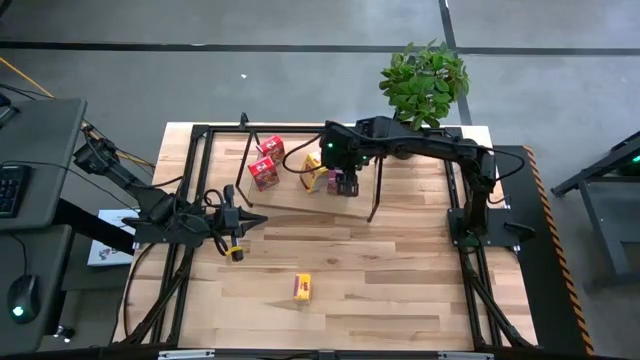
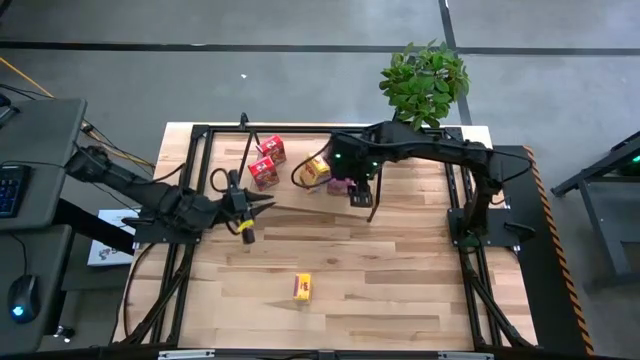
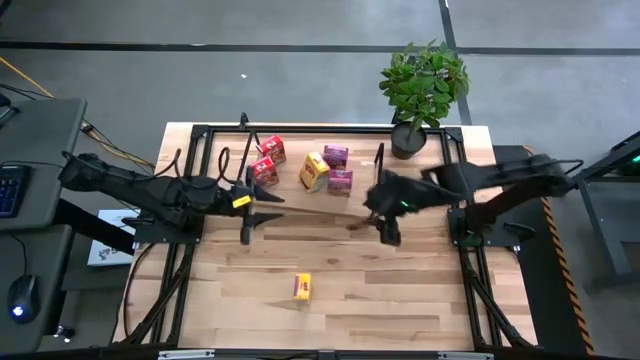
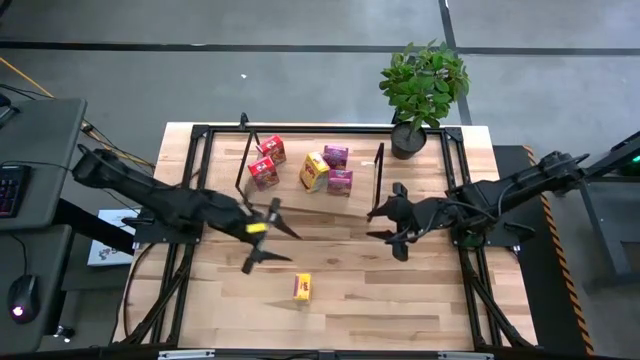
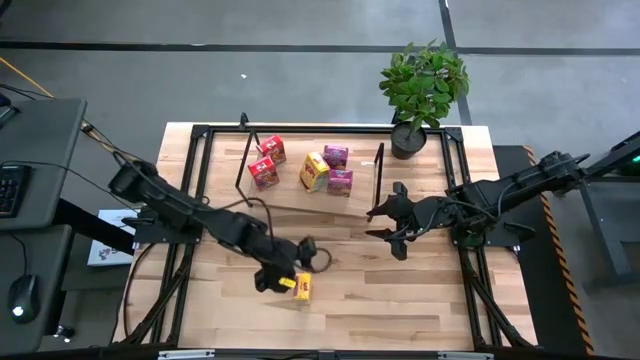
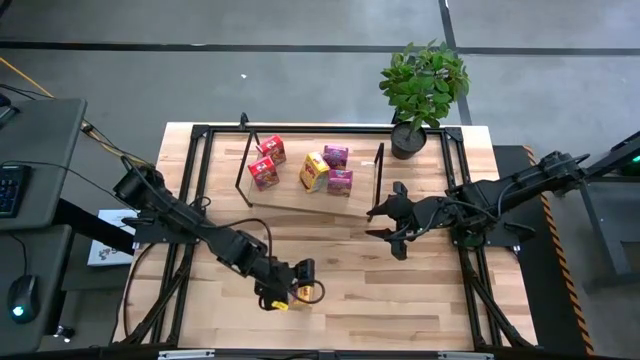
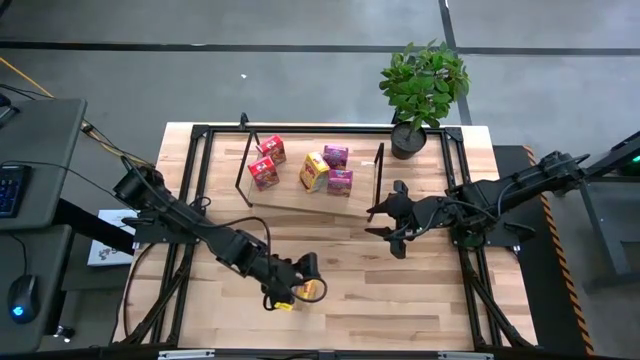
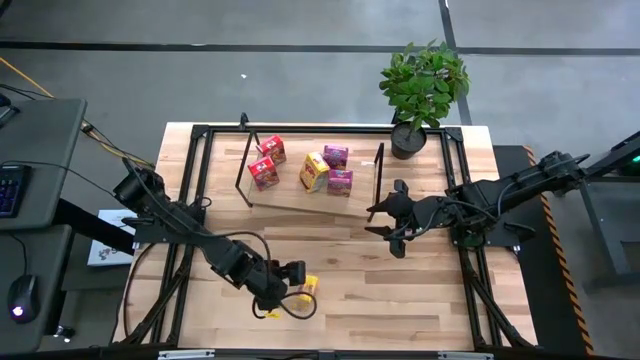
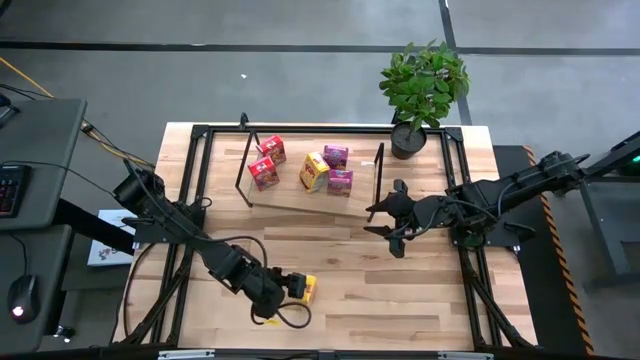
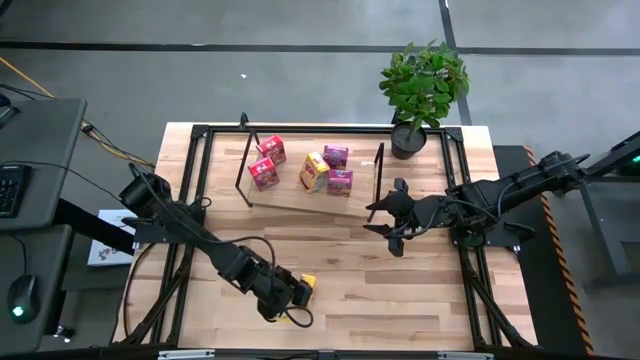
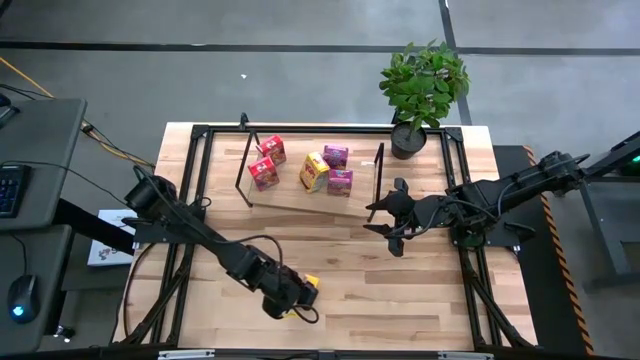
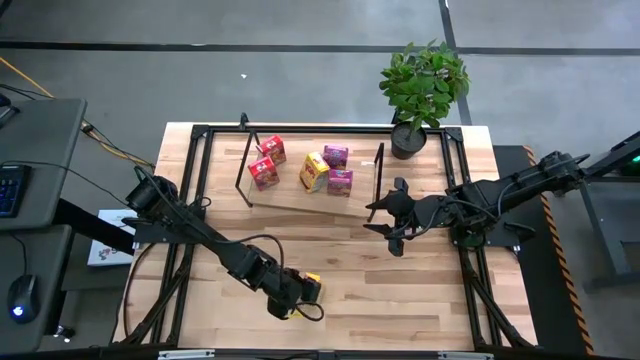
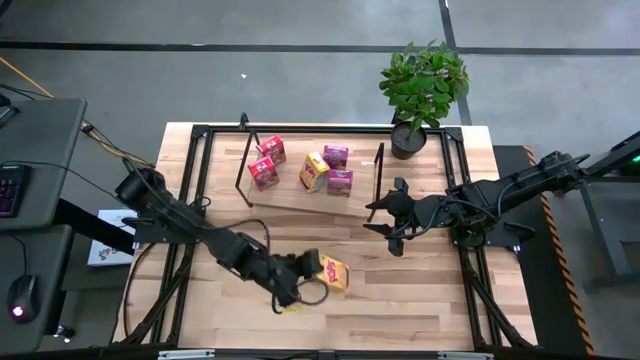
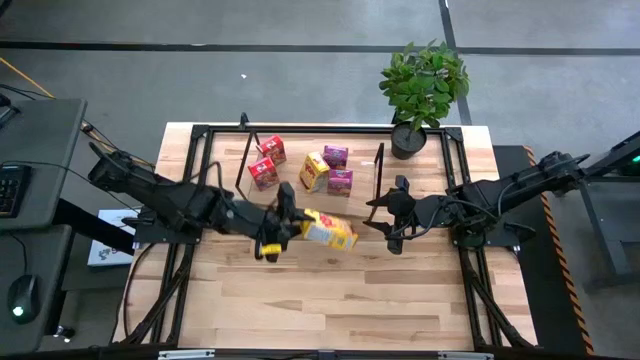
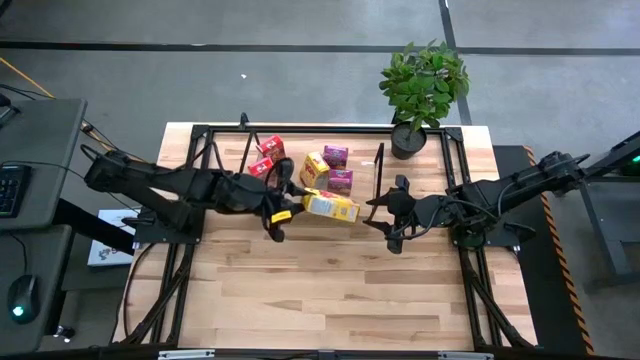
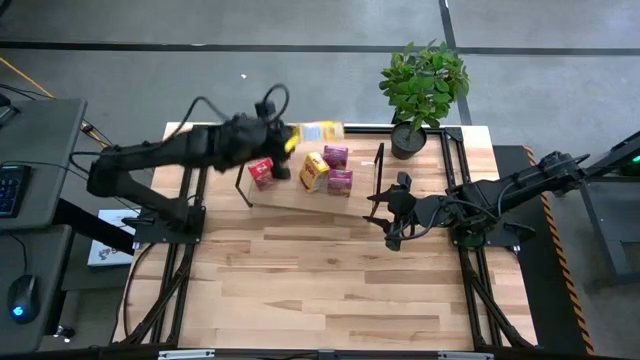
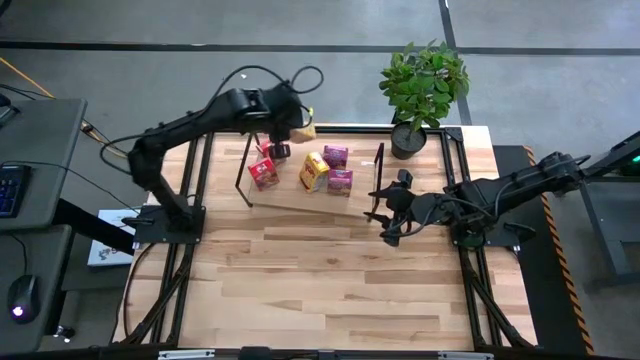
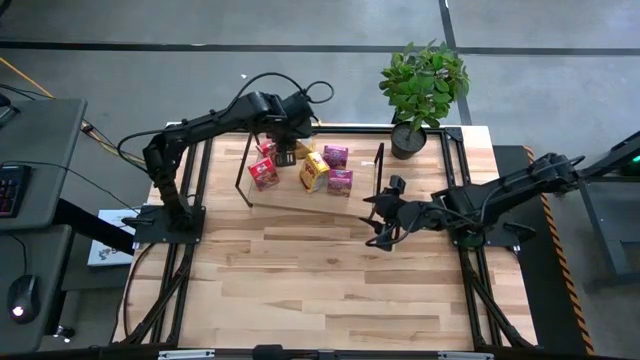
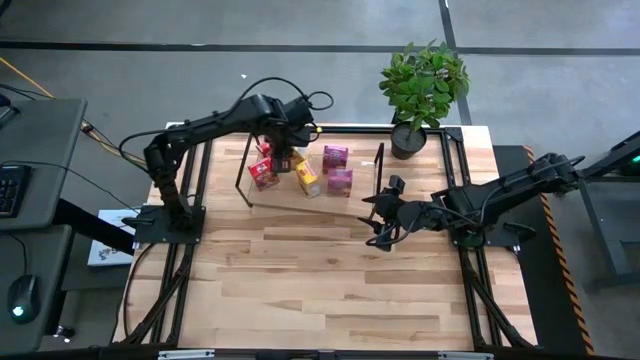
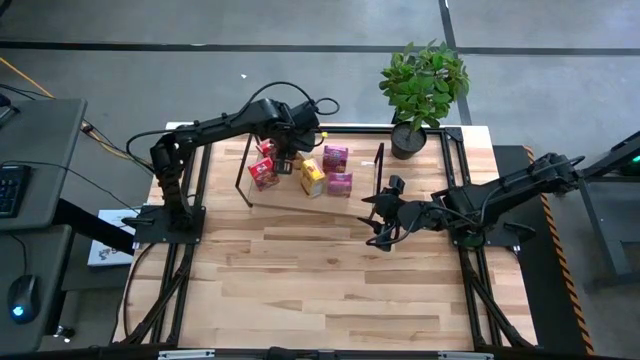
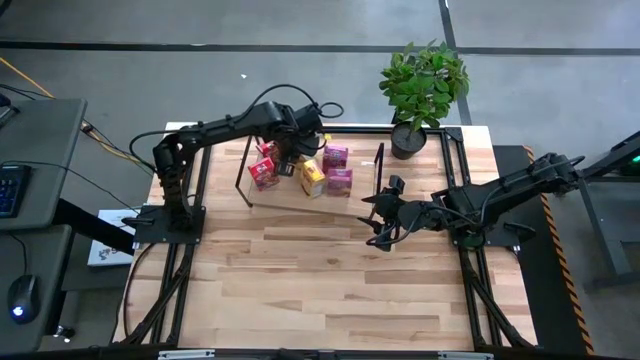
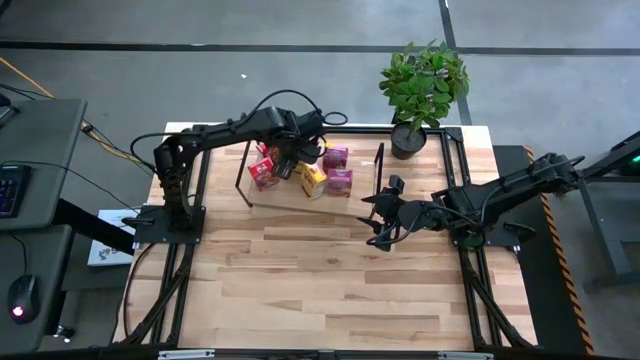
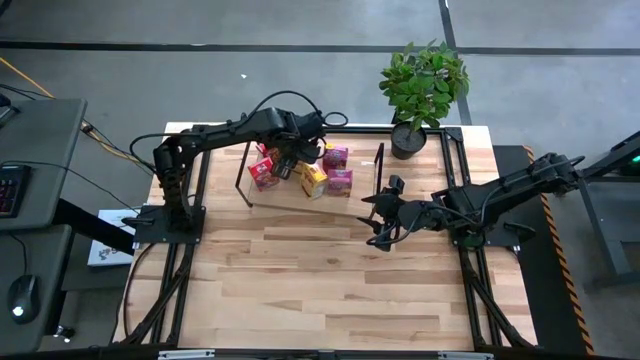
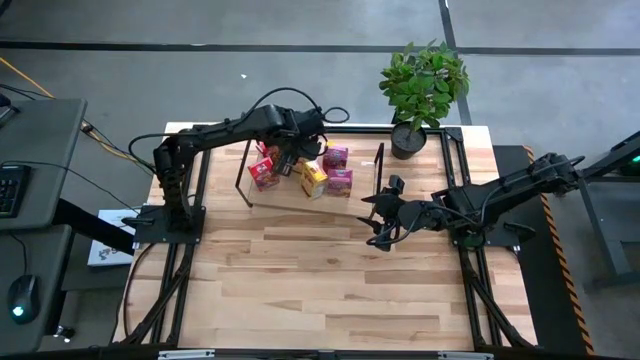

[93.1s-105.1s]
Task: Stack cereal on shelf
Put the yellow cereal box on the shelf

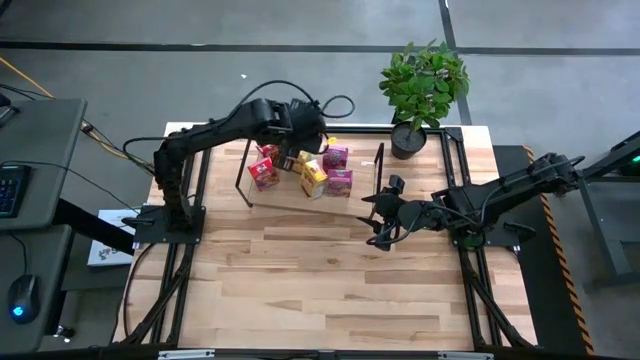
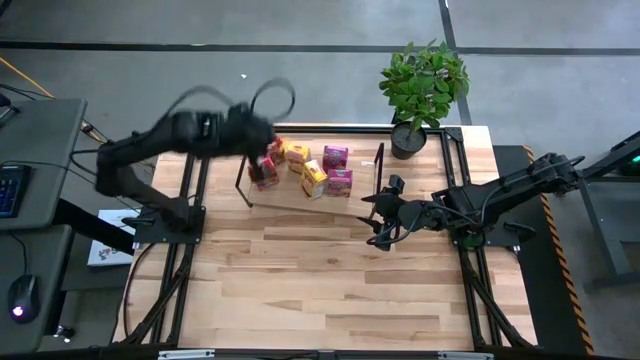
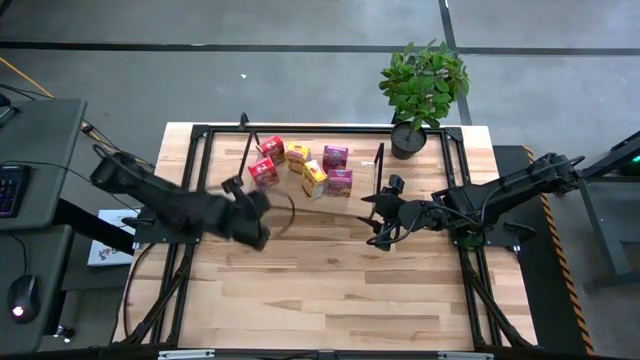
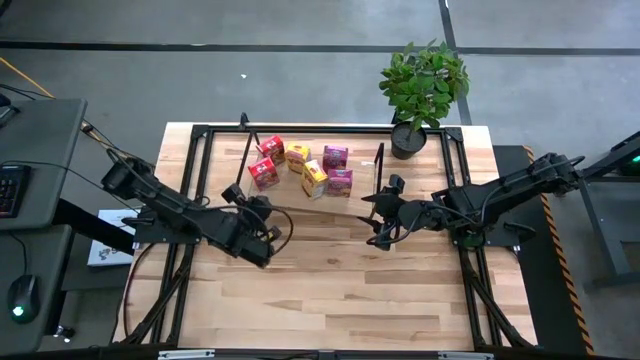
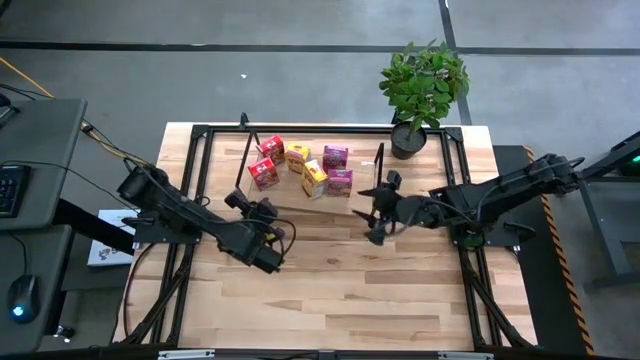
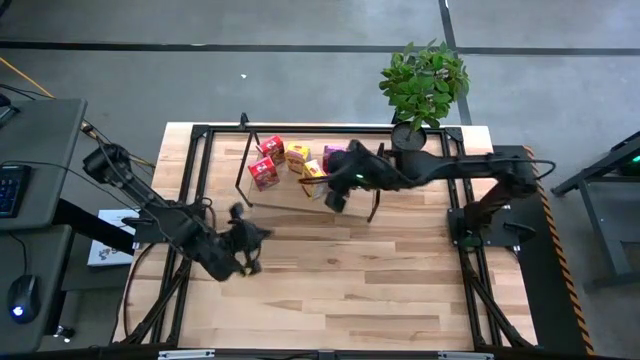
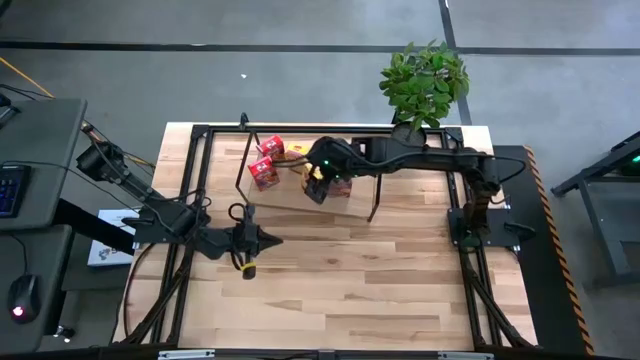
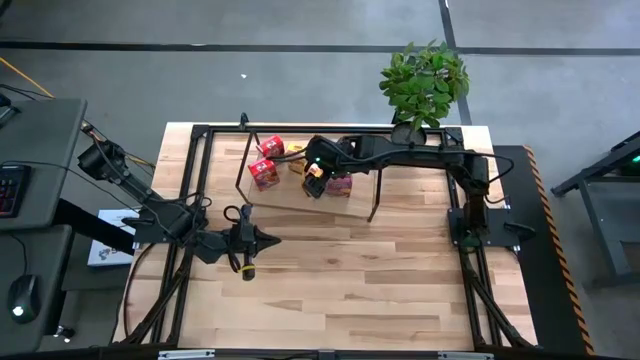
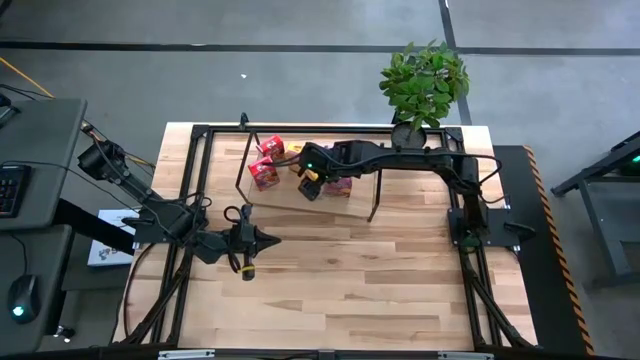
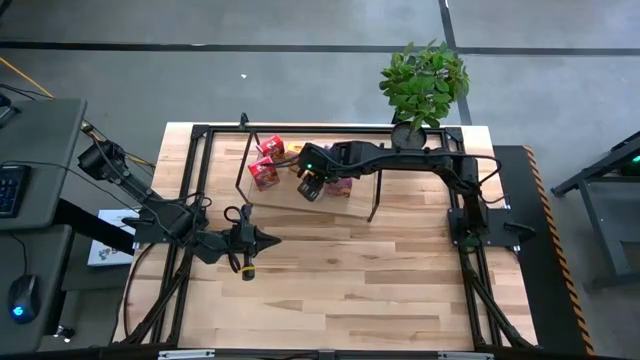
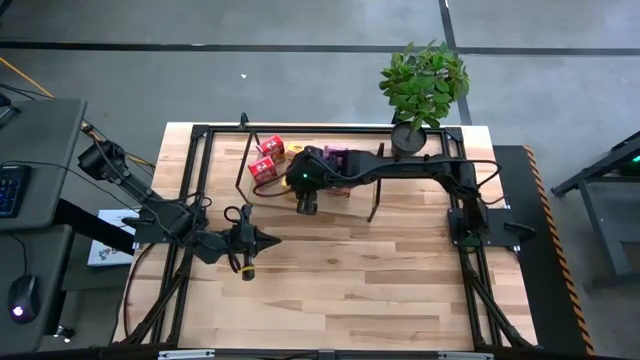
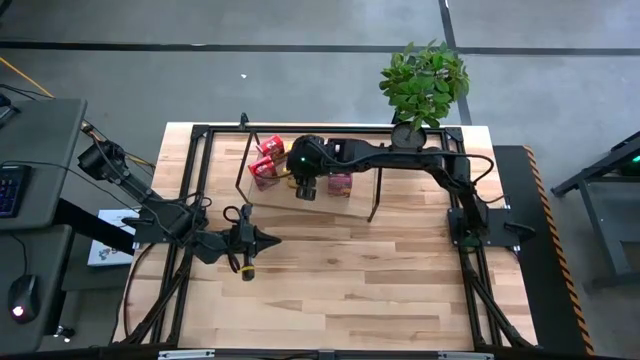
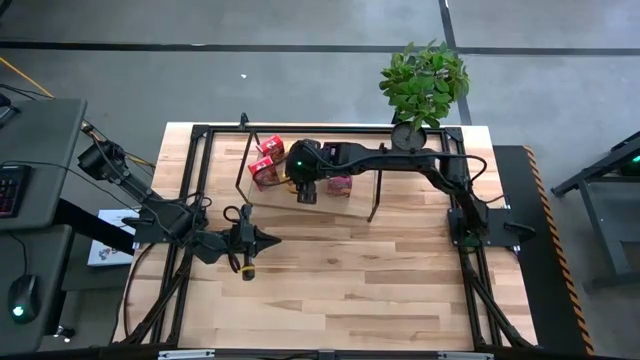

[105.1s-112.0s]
Adjust the bottom yellow cereal box on the shelf to align it with the other yellow cereal box

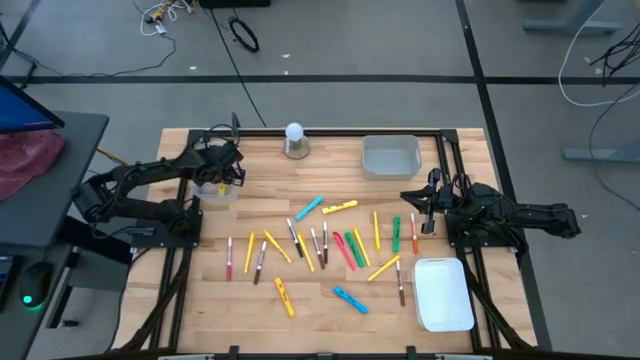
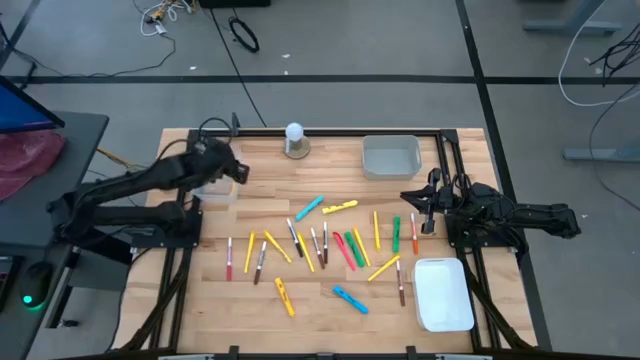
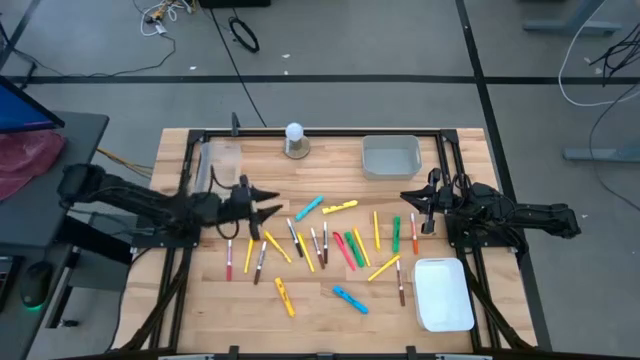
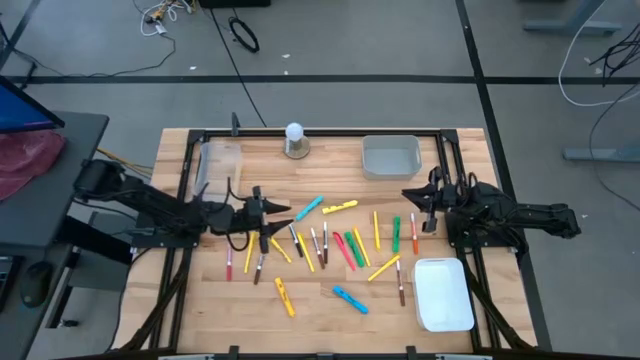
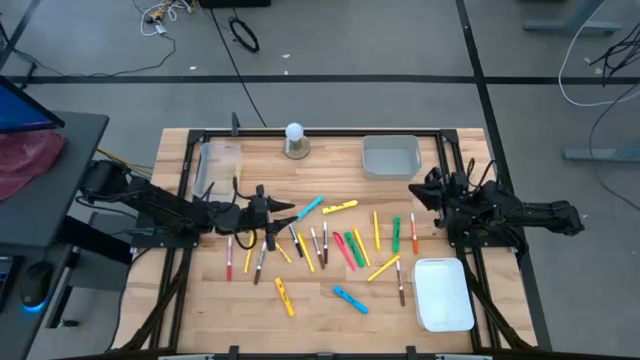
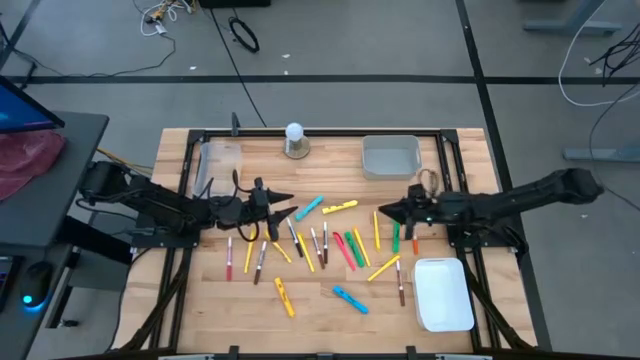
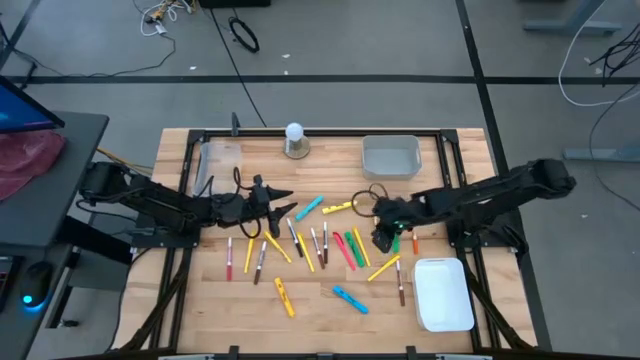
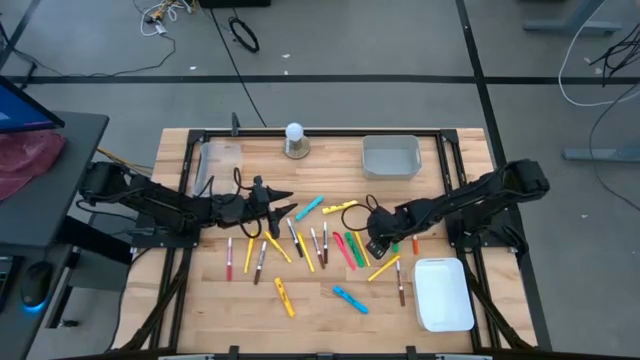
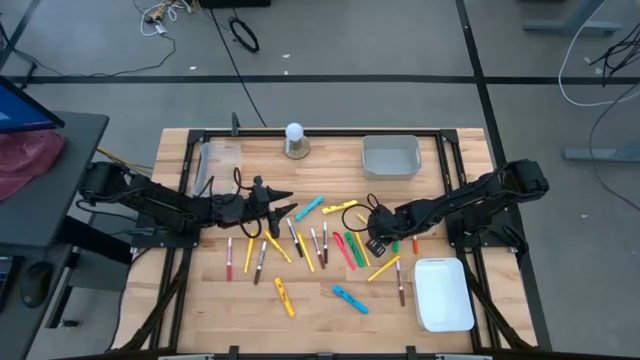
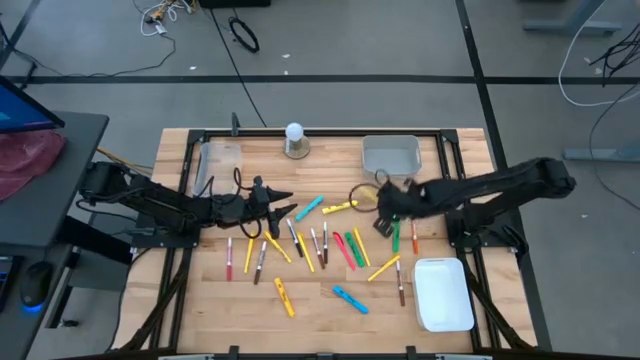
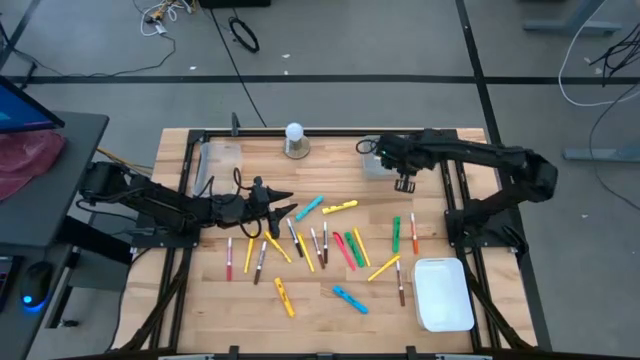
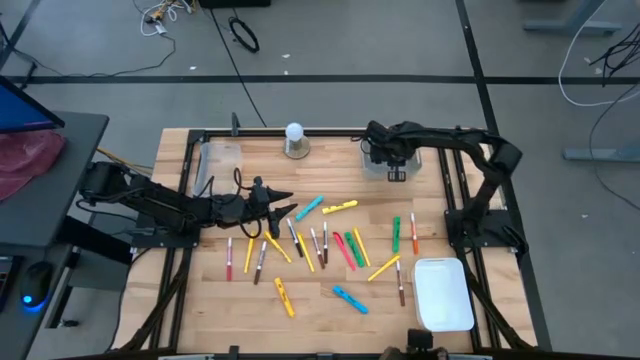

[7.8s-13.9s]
Task: Pick & Place Markers
Put the yellow pen into the gray bin
